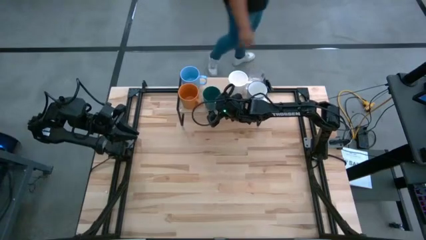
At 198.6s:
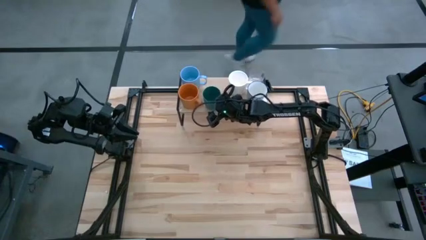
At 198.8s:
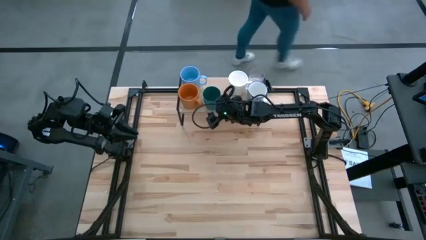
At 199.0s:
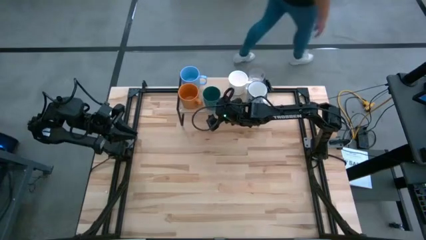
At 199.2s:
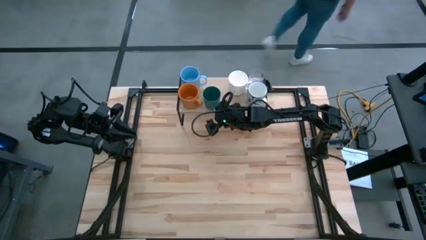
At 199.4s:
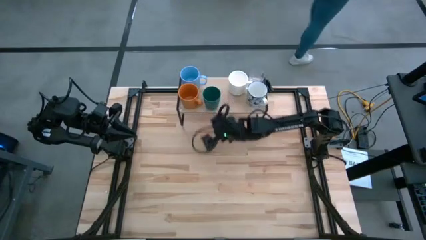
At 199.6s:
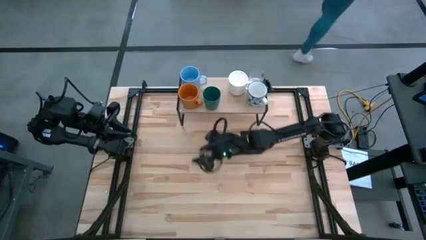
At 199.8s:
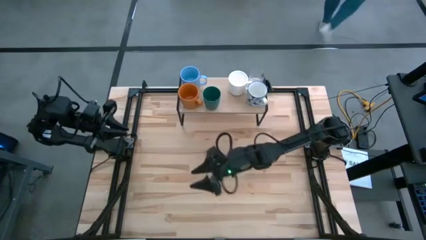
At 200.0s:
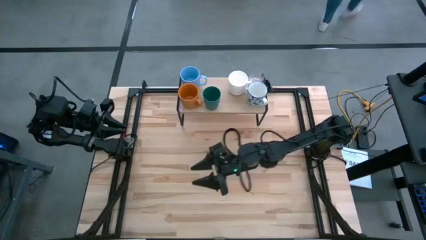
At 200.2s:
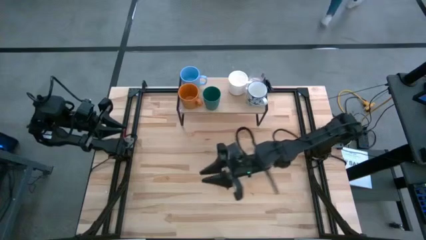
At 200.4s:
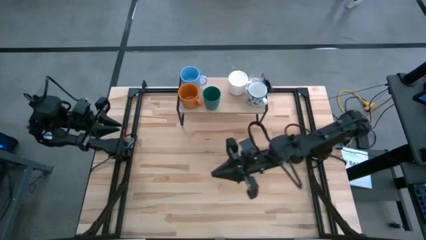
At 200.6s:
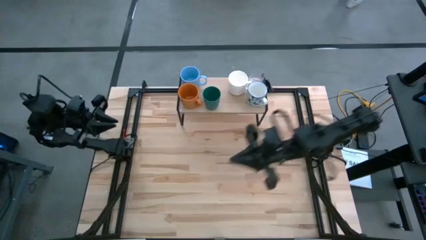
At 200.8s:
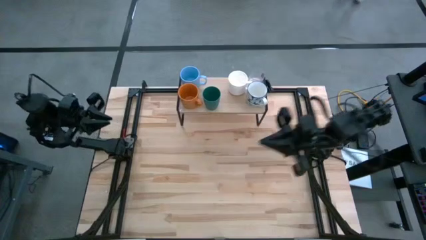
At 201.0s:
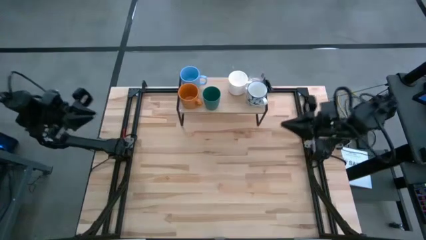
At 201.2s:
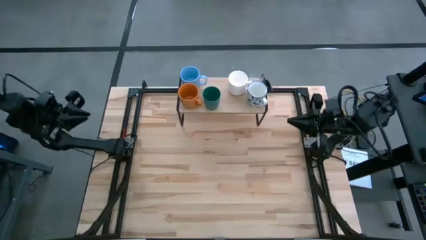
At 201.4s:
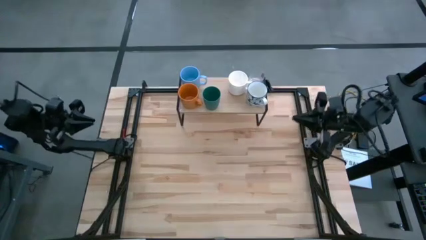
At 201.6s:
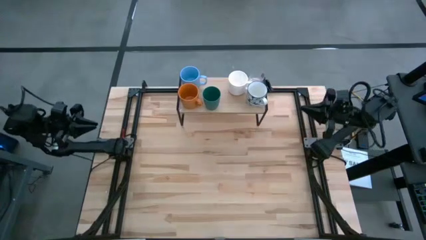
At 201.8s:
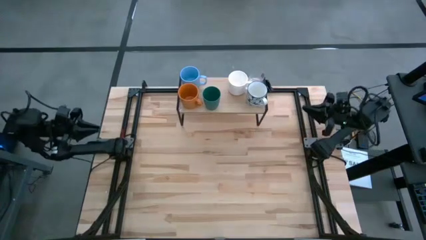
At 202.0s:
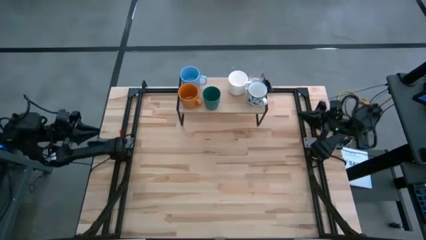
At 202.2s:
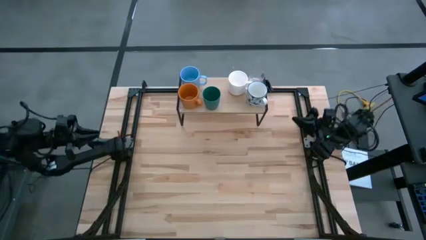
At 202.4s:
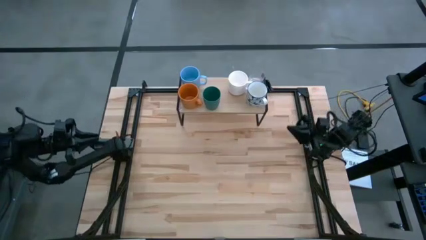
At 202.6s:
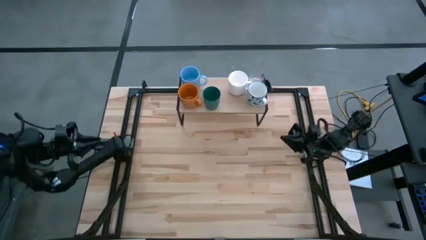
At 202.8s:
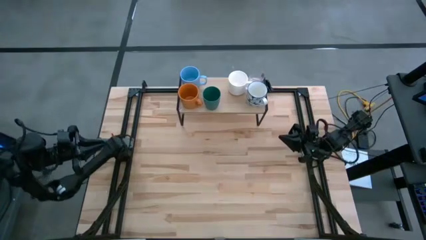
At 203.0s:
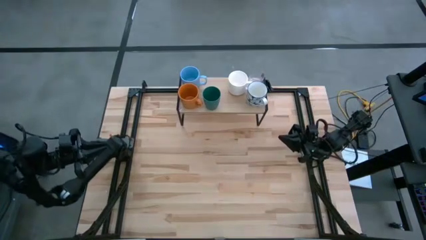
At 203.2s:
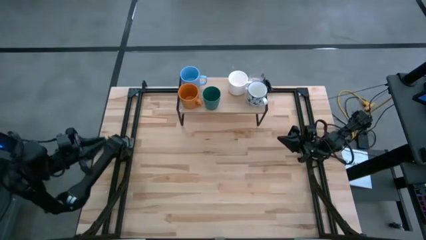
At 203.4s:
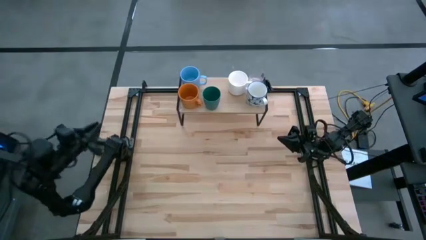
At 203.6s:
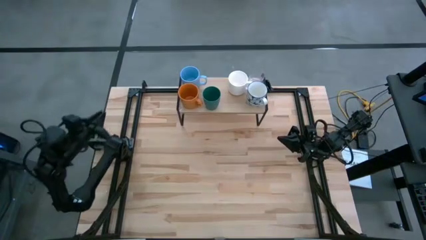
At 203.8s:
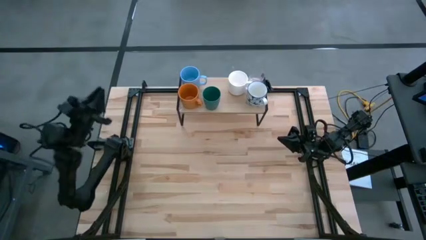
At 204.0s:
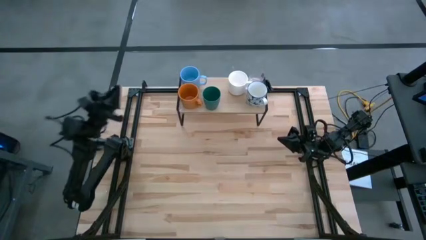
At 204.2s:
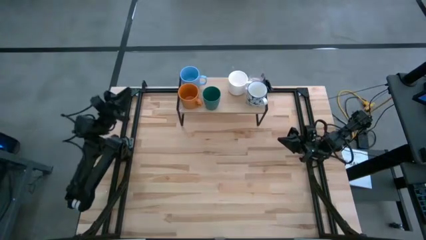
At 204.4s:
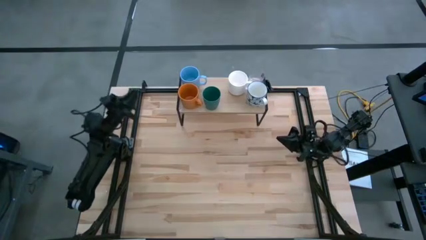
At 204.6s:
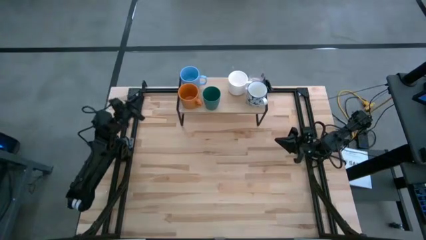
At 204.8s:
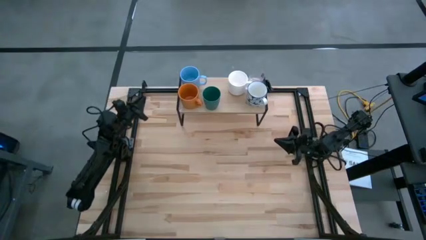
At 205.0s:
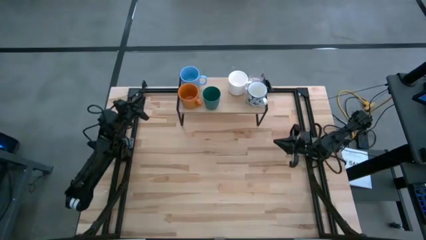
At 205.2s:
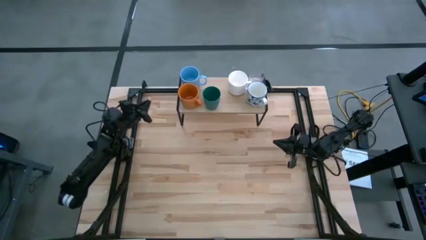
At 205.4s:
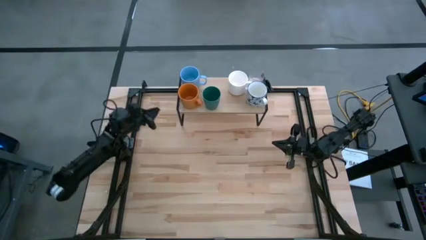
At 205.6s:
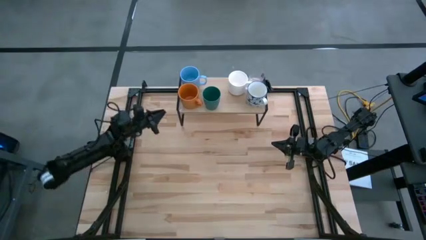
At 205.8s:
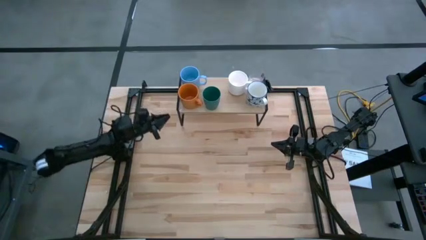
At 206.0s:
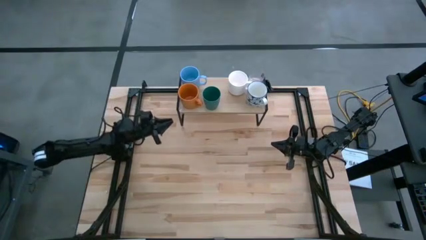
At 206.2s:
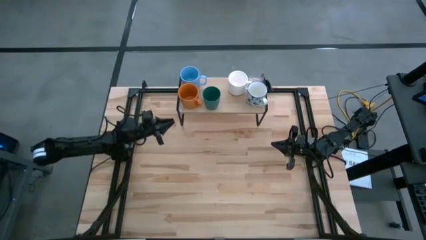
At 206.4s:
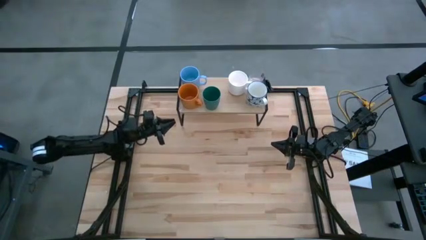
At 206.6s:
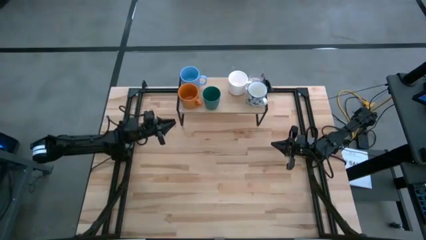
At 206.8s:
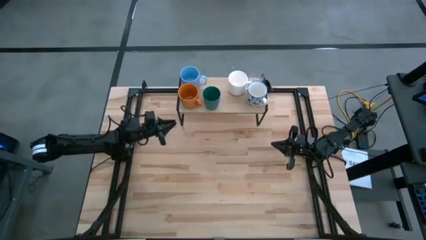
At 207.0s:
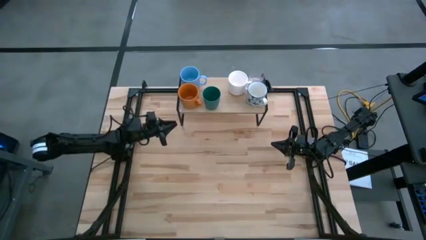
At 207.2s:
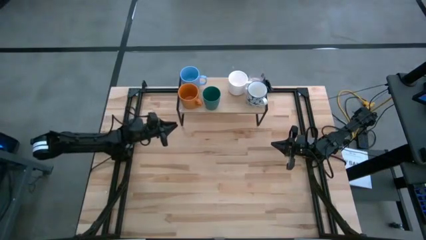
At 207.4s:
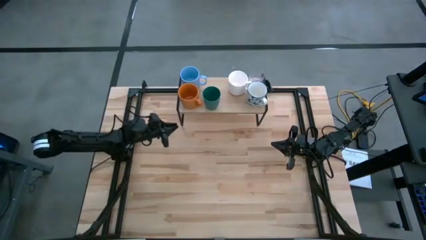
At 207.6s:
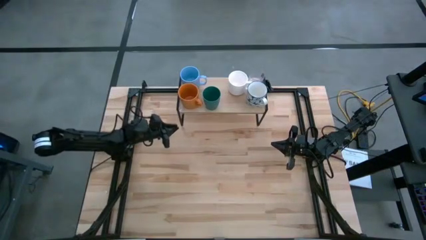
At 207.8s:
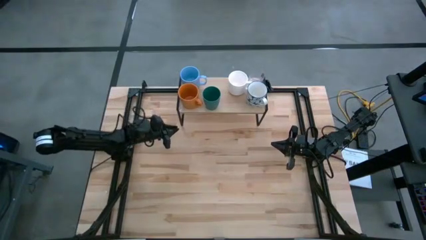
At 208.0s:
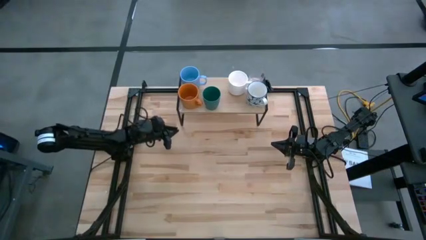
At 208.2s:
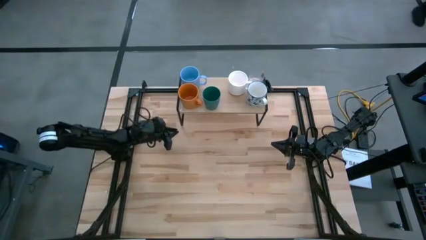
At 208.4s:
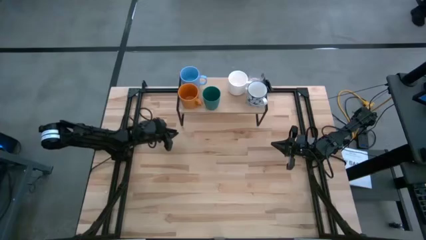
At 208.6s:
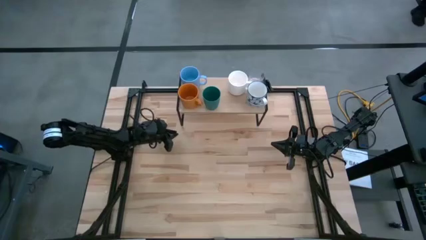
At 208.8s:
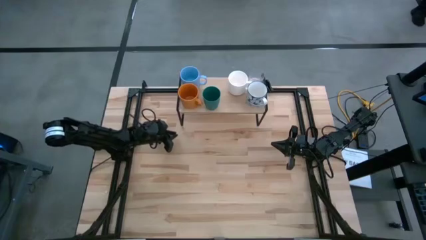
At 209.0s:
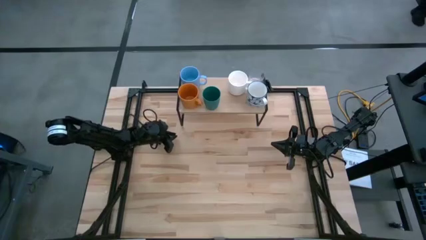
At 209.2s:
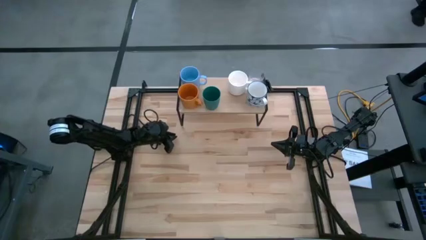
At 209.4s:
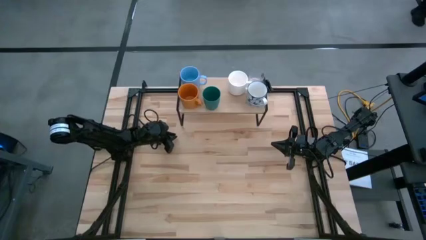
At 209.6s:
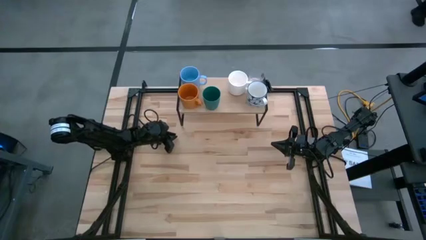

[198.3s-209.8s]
Task: Stack small to large cups/mugs on shelf
Return to Home Position

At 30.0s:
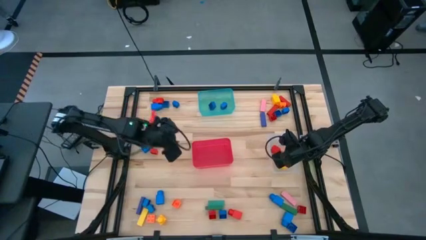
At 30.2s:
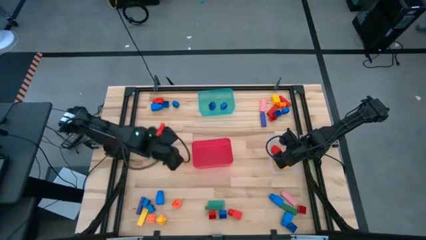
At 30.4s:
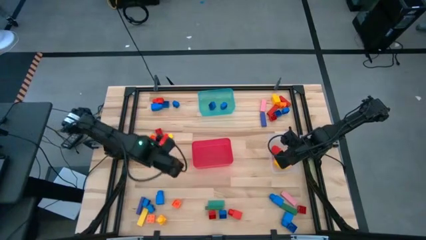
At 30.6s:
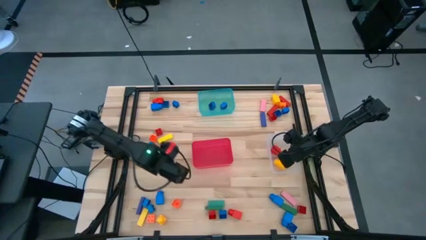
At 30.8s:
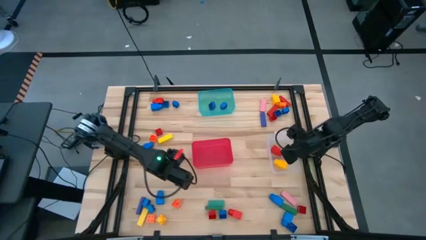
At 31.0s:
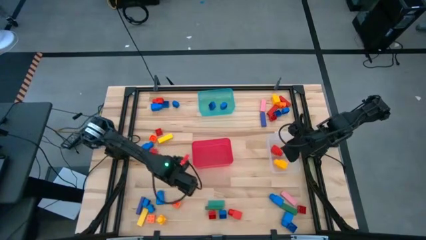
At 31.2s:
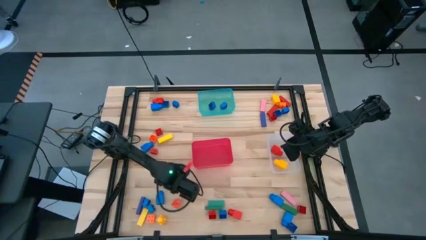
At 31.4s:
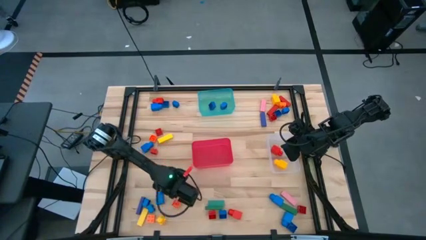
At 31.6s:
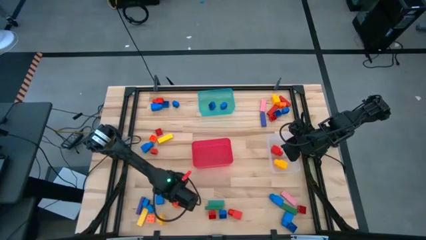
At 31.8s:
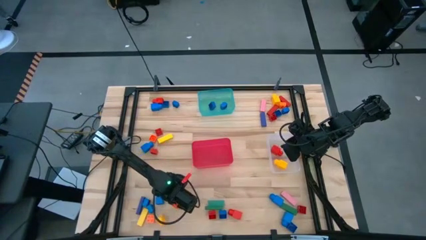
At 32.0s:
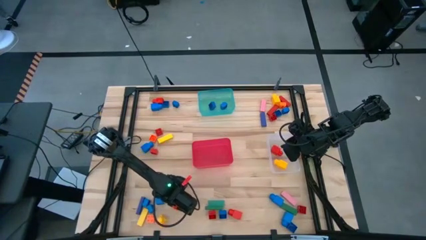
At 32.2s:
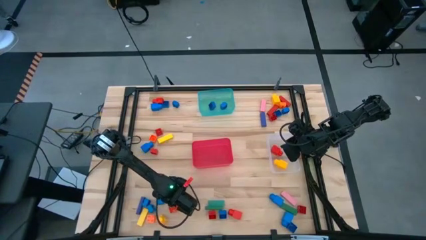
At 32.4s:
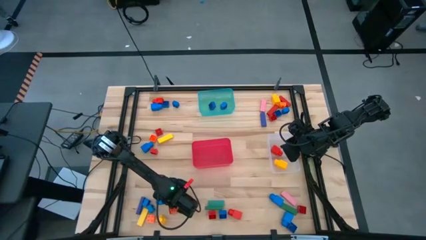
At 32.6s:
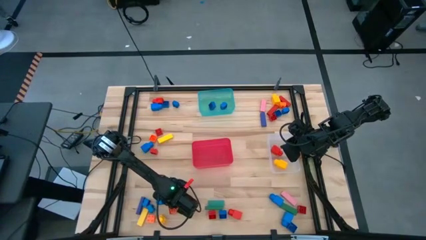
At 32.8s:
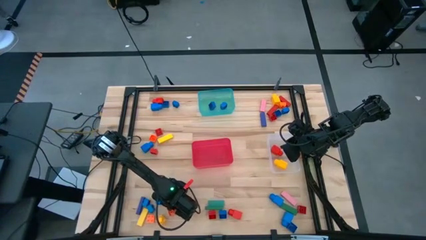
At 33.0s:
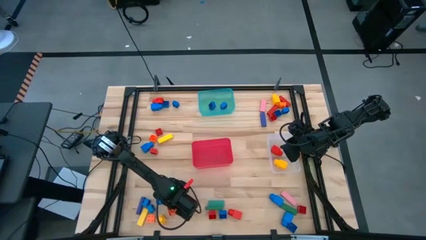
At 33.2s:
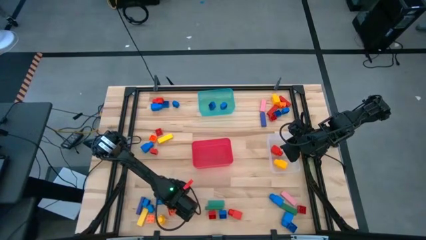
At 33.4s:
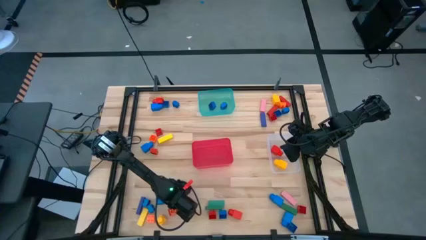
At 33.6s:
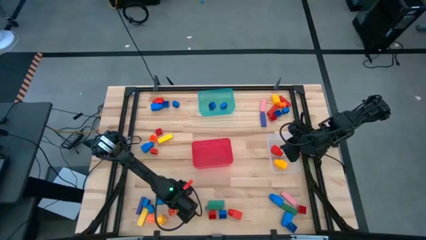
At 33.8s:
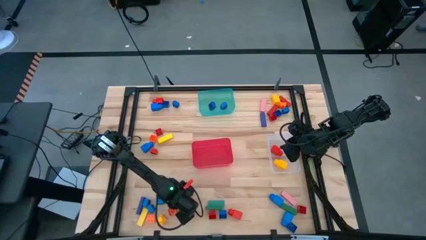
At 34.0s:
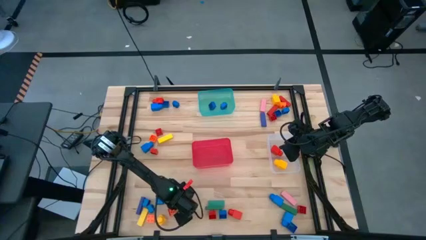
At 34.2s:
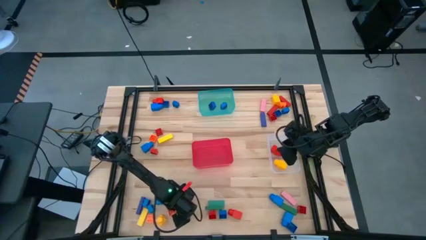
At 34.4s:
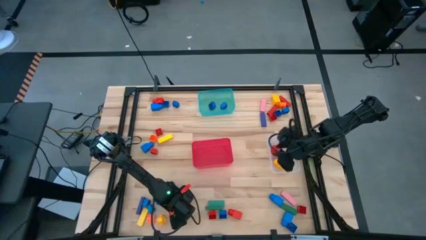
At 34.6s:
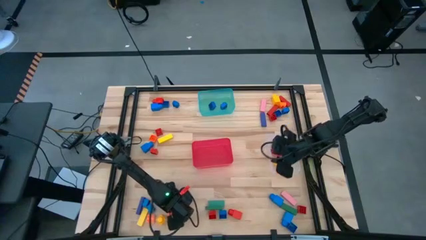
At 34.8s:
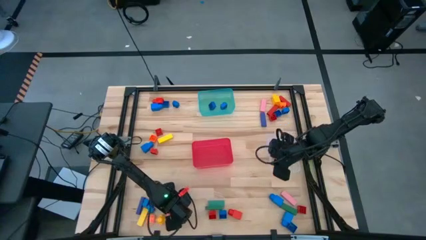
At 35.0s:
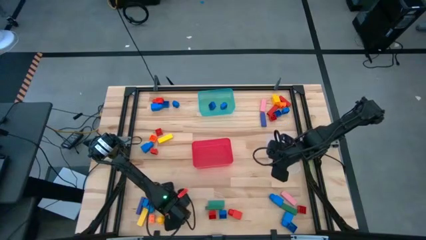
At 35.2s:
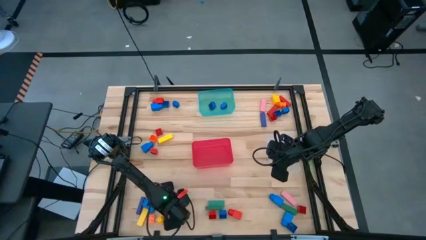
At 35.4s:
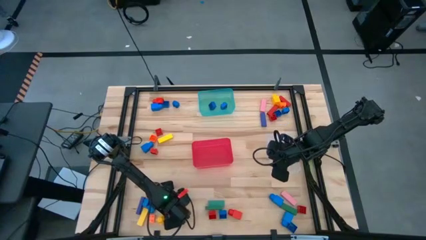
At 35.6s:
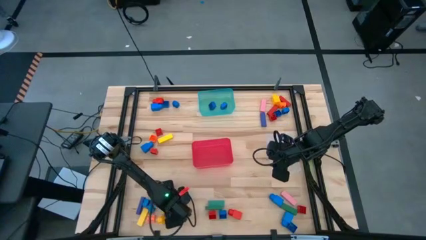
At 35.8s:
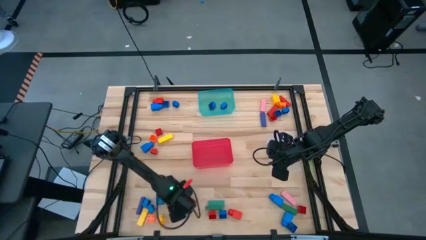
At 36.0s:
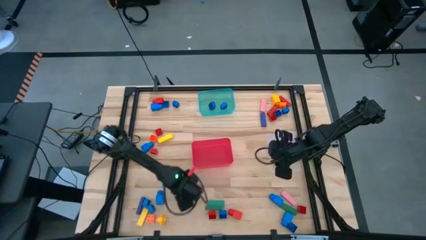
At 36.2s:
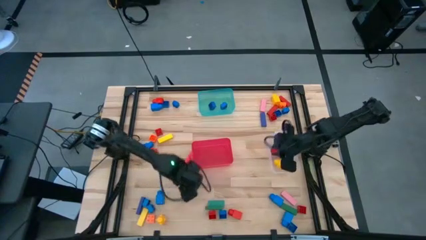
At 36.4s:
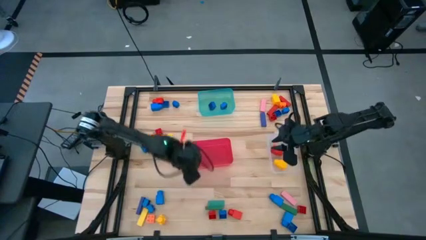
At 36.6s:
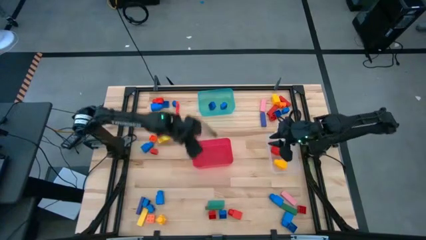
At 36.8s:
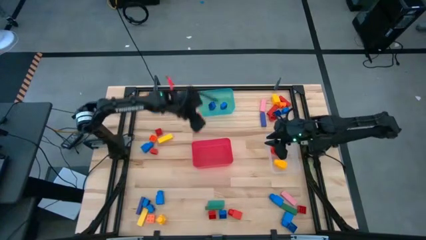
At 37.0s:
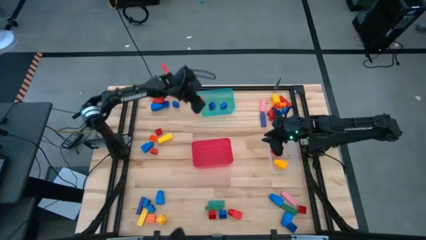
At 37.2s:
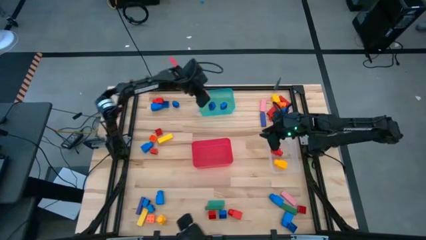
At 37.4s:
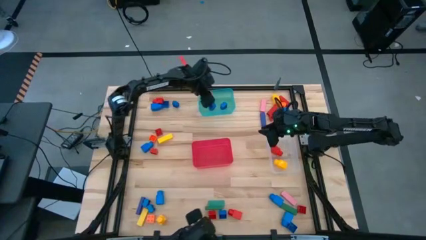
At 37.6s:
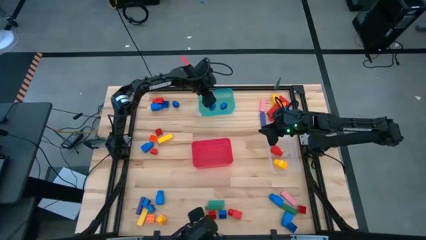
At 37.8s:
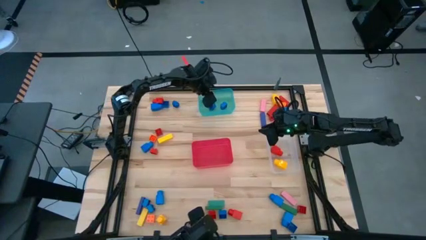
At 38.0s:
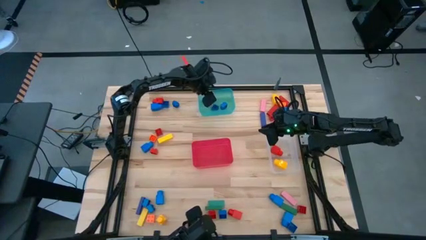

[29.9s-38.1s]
Task: Sort blocks by size
Put the orange 4 stud game piece into the blue bin
